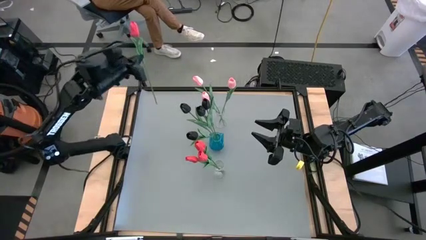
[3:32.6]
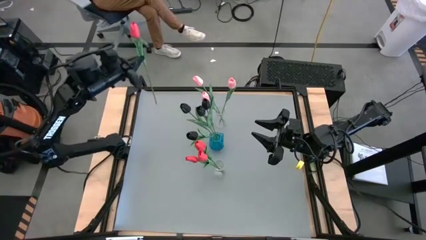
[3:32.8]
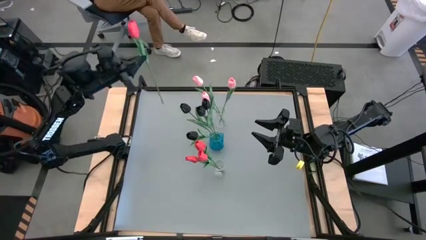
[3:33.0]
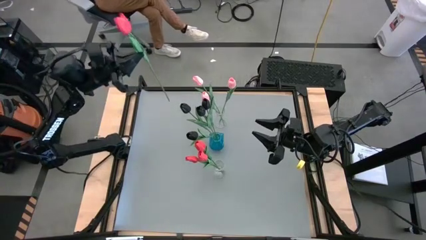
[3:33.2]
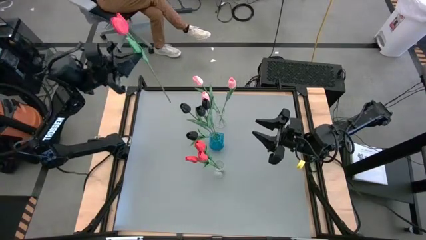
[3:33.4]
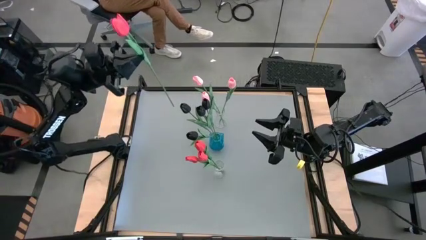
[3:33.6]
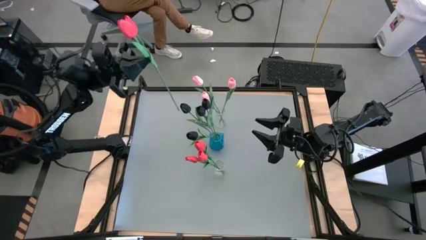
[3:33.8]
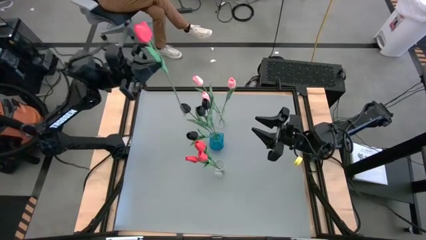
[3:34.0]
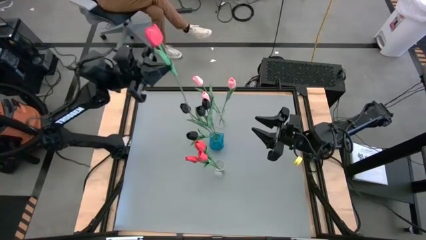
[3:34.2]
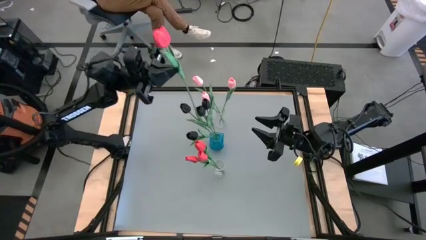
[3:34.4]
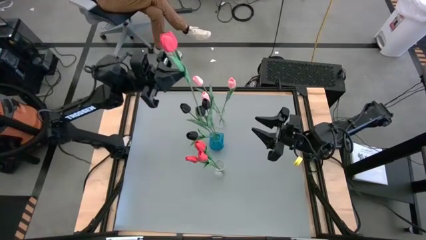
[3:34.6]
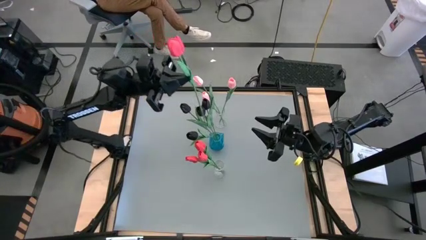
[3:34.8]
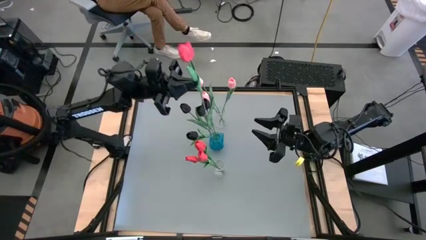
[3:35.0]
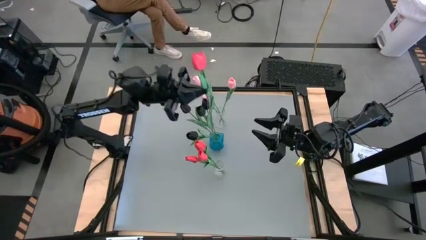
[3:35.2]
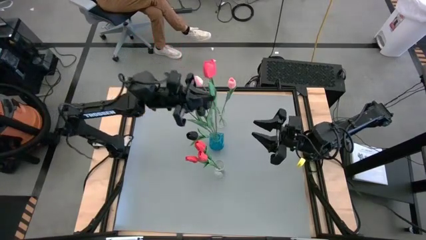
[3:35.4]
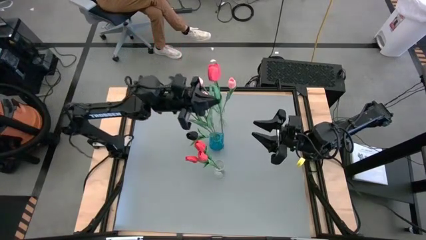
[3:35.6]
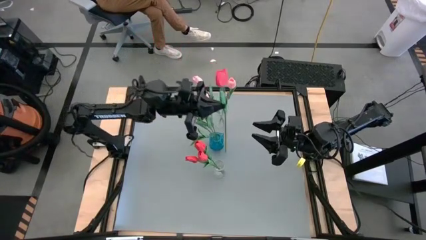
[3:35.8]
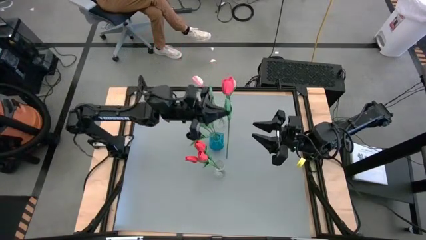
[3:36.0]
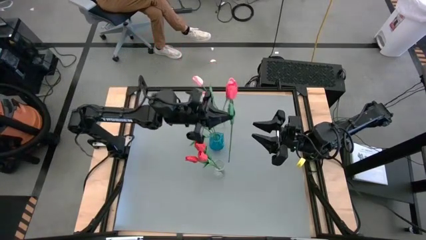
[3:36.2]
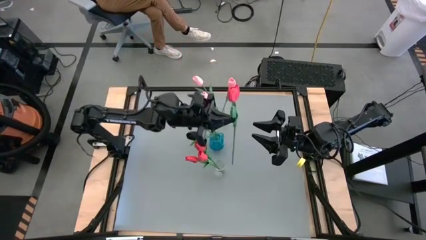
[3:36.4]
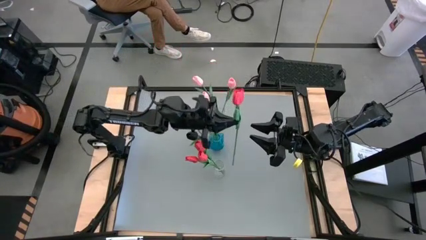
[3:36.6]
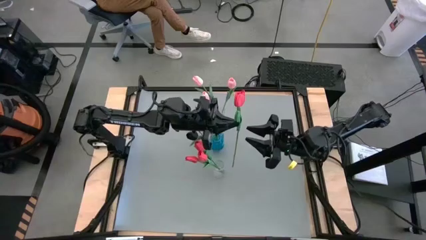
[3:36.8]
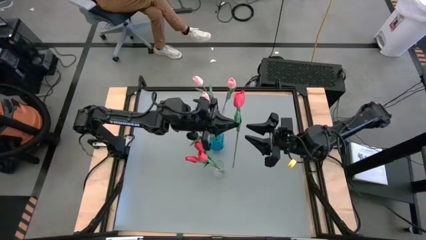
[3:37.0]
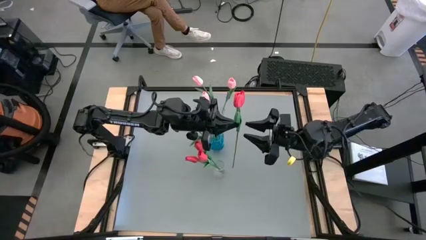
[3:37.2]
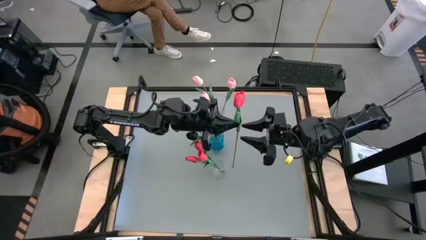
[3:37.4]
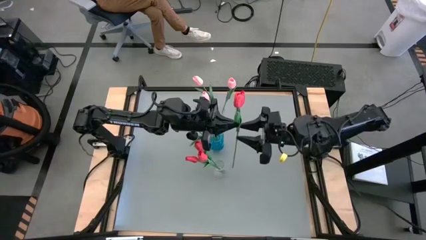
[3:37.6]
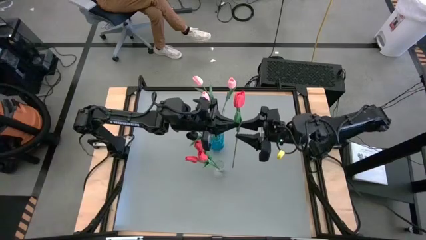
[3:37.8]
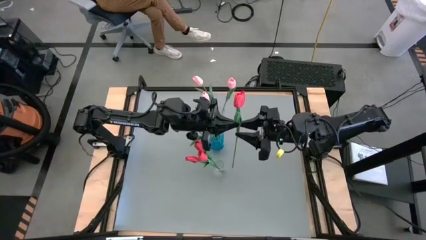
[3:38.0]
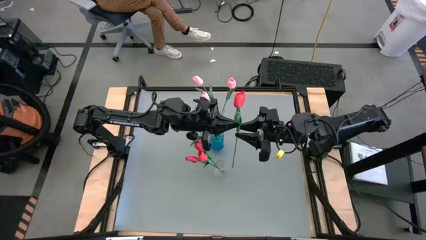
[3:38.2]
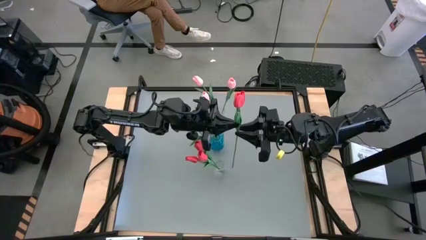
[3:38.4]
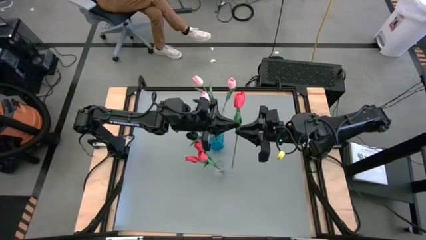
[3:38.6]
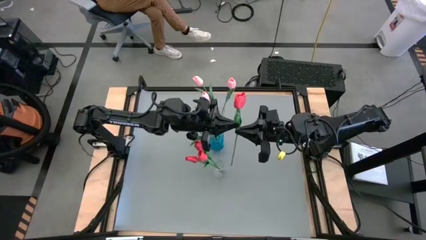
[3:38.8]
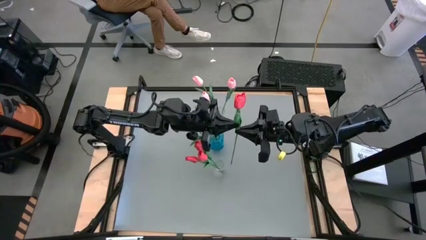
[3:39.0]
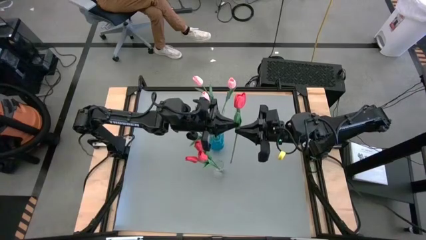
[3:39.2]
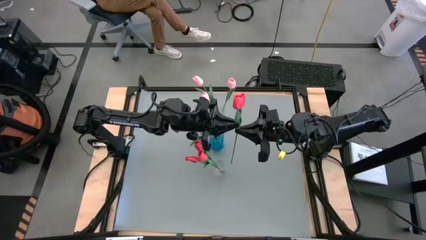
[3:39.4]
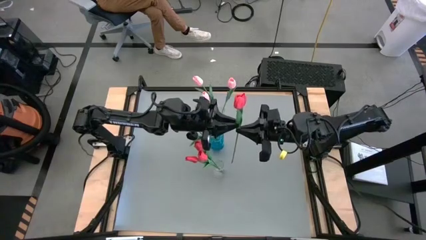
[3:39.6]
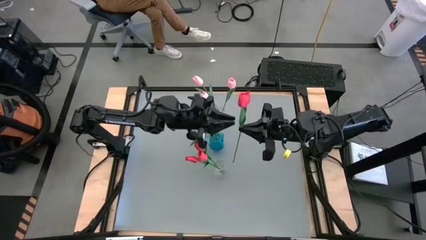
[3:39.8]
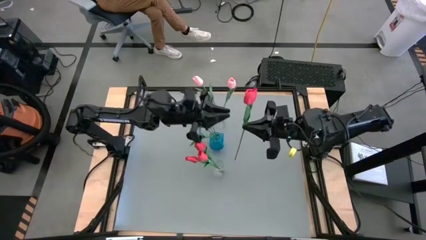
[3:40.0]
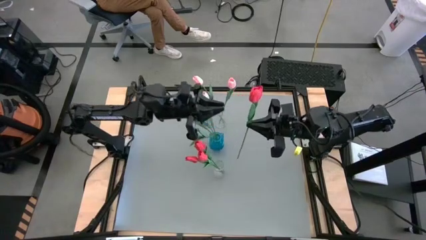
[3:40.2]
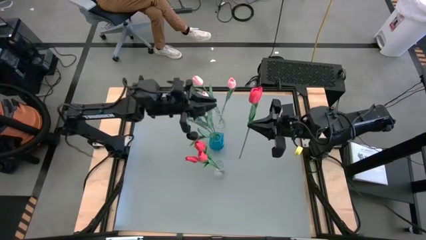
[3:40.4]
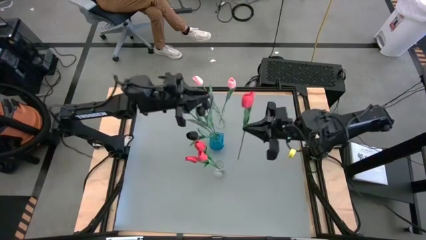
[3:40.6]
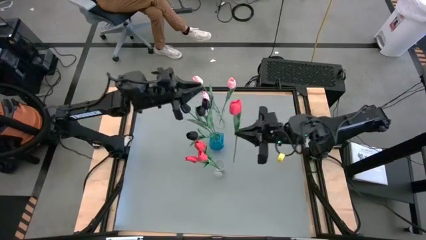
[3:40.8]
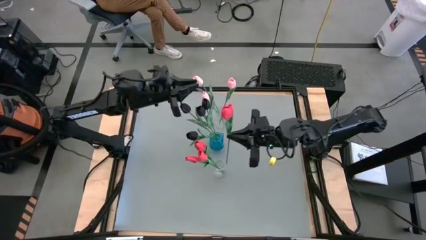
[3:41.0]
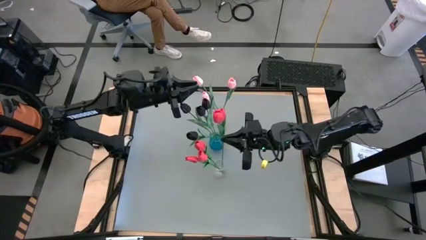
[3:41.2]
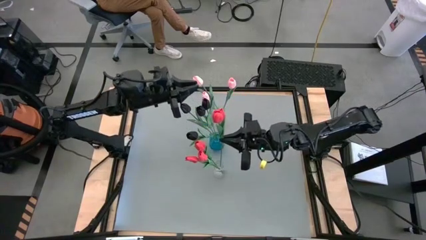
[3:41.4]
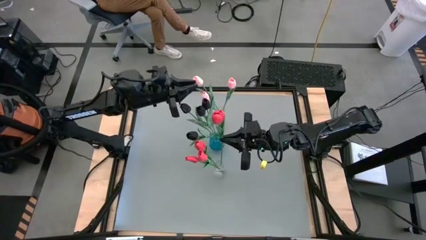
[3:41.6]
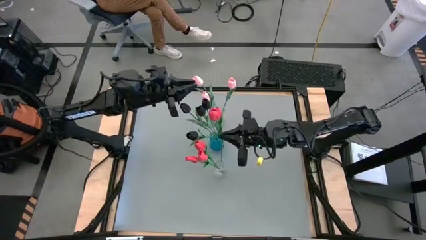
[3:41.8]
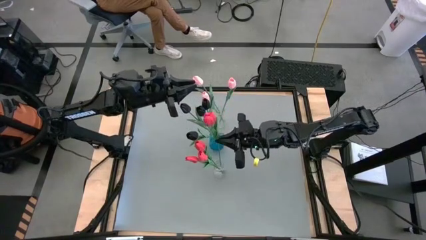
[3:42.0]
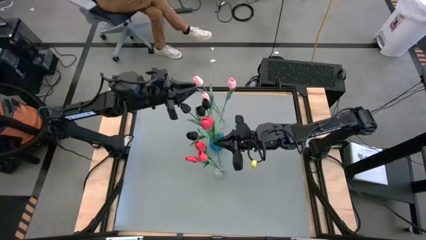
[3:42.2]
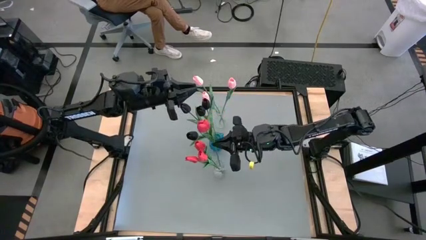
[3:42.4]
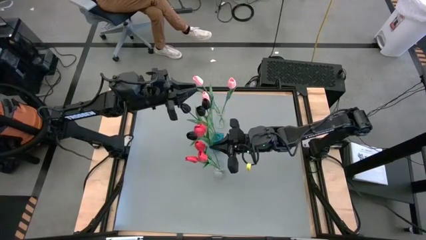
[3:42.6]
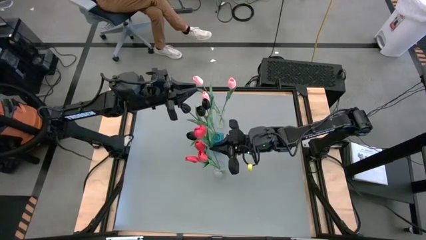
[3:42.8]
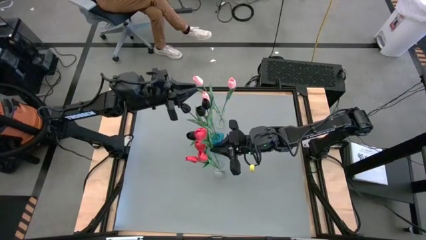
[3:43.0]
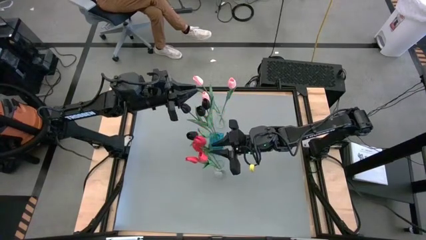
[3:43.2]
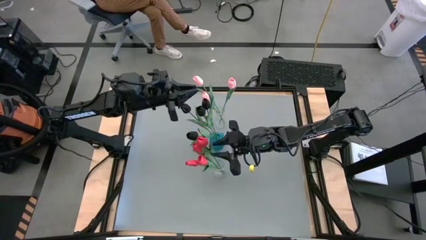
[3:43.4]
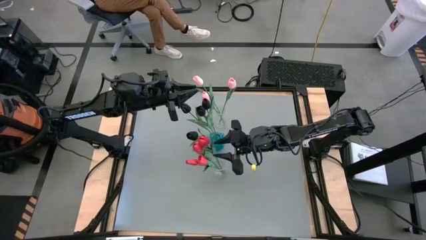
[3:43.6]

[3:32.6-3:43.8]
Task: Sort flowers into vase by color
Put the red tulip into the bottom transparent vase

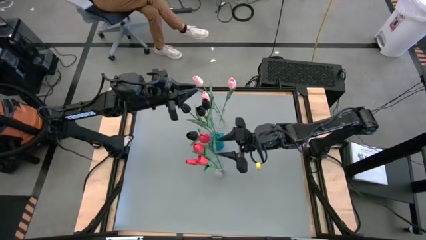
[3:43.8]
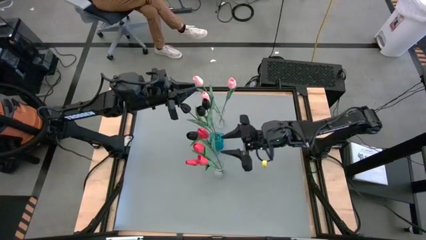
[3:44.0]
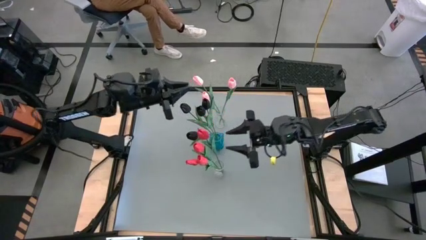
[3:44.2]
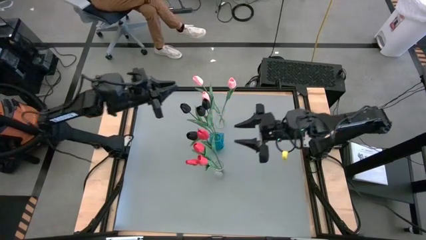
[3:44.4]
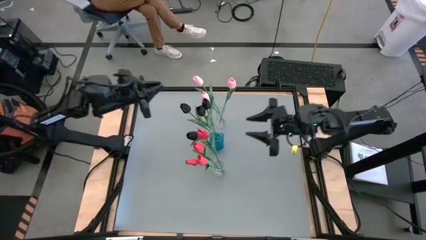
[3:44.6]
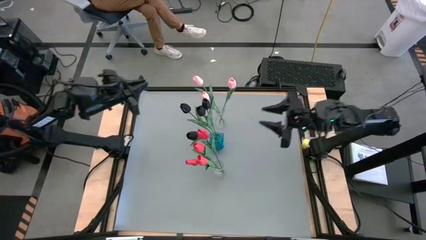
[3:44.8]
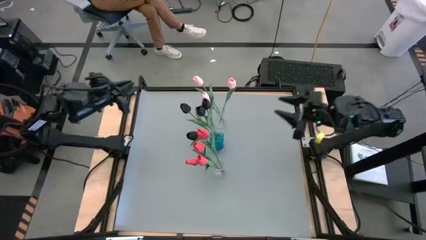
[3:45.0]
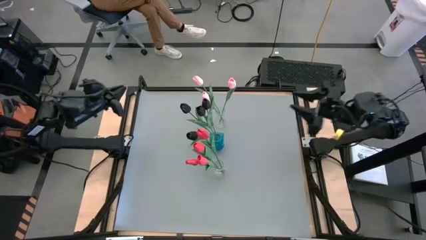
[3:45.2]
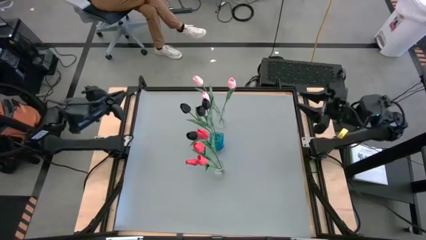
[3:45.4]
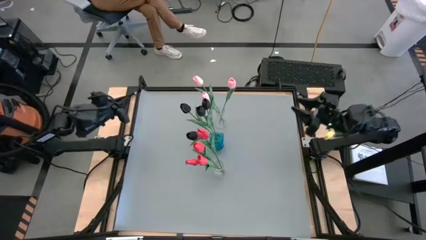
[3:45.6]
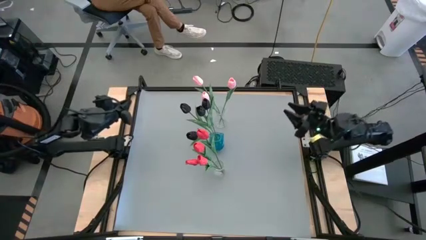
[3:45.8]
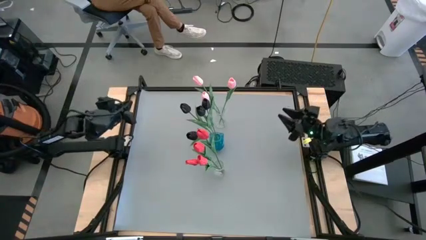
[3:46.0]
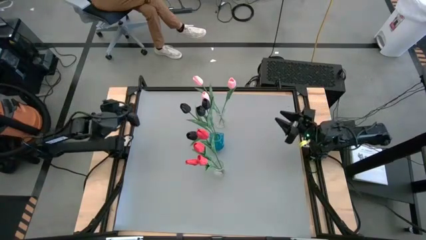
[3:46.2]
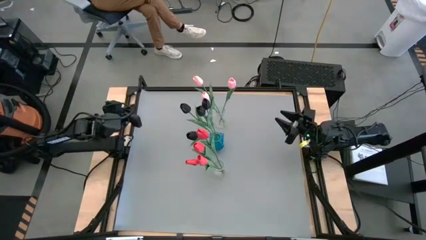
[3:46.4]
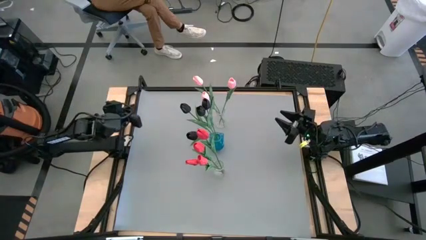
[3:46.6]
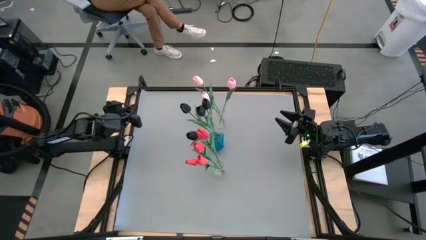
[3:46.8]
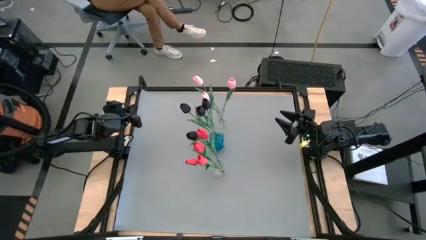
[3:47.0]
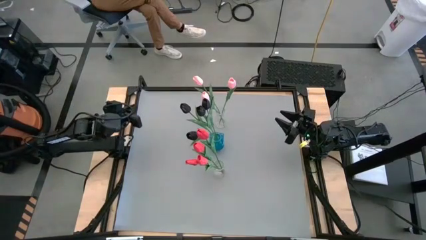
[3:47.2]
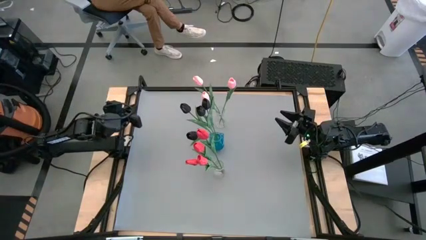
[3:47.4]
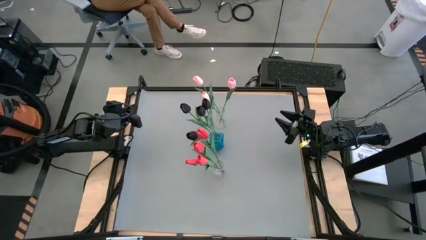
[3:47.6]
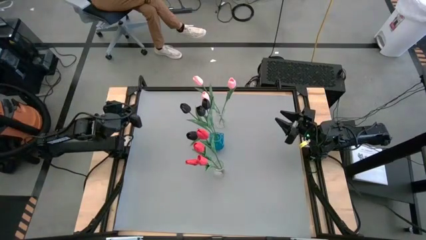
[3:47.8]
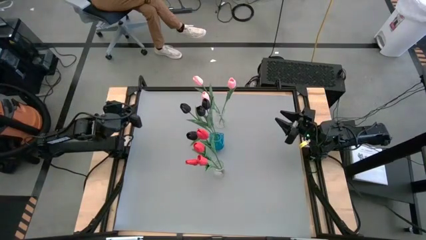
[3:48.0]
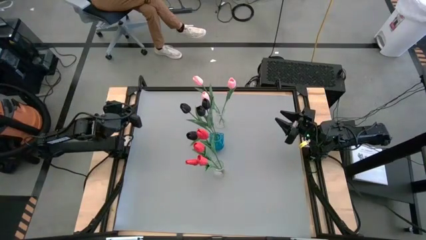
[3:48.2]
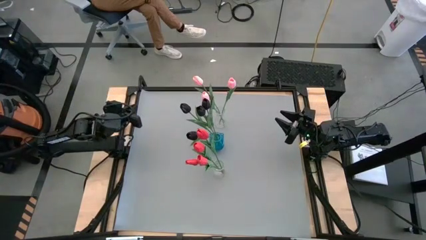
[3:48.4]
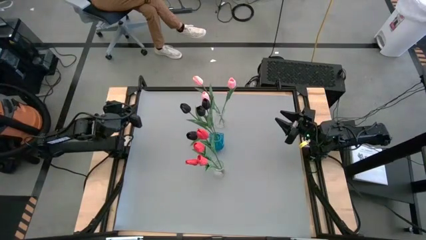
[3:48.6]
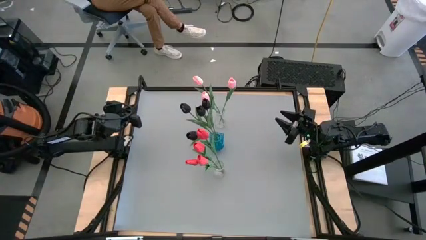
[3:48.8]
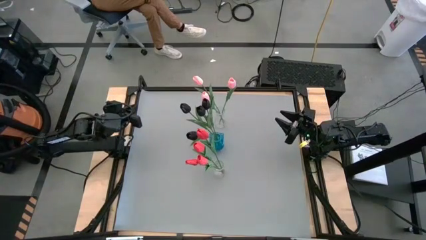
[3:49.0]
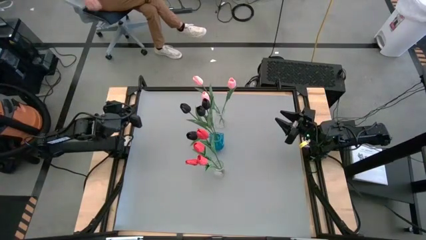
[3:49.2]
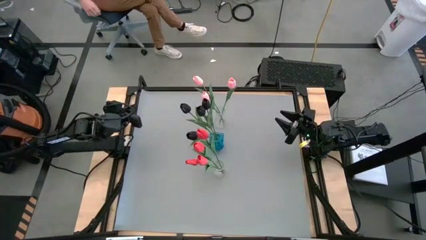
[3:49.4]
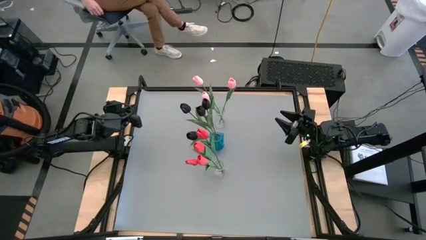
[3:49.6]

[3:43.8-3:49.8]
Return to Home Position
